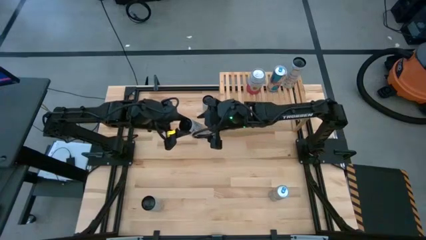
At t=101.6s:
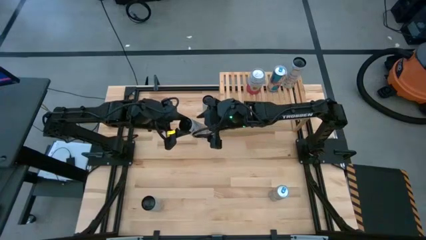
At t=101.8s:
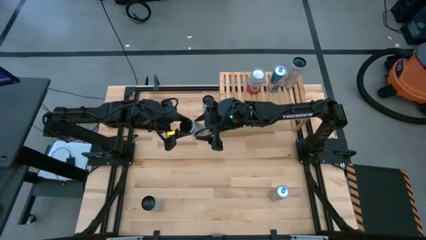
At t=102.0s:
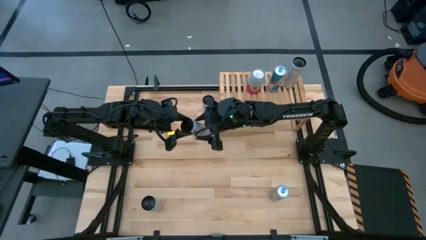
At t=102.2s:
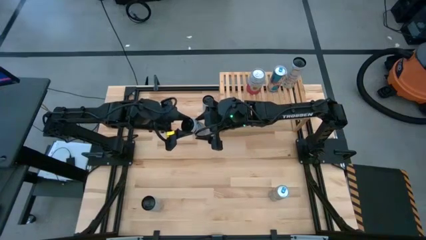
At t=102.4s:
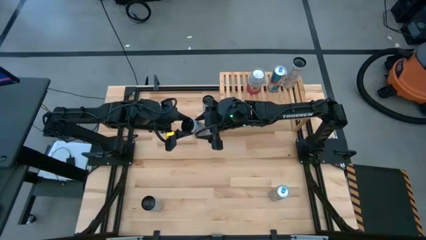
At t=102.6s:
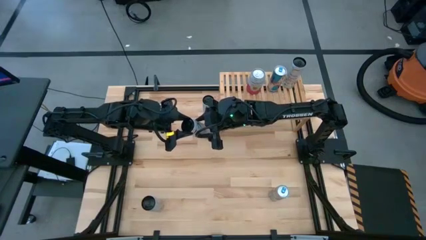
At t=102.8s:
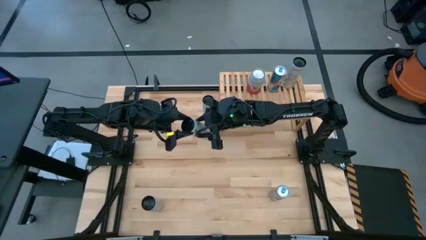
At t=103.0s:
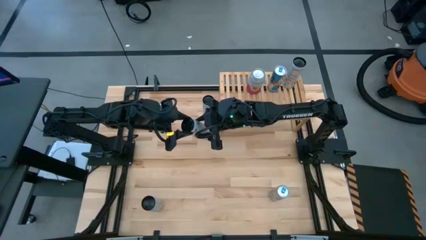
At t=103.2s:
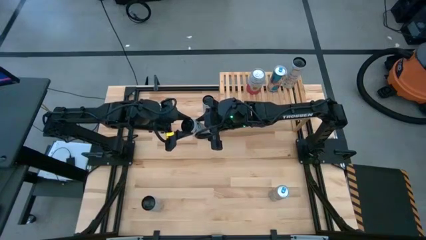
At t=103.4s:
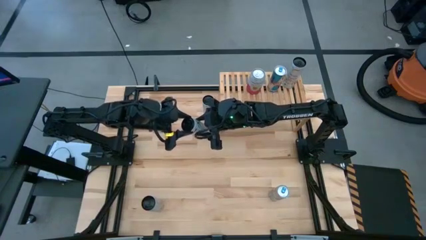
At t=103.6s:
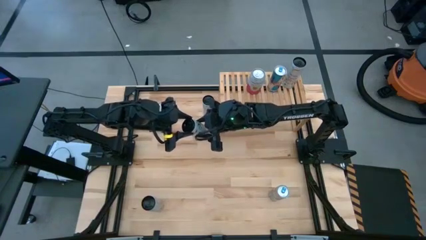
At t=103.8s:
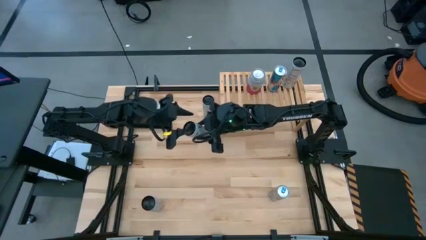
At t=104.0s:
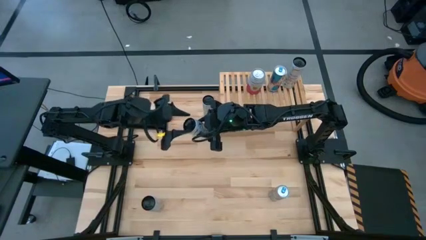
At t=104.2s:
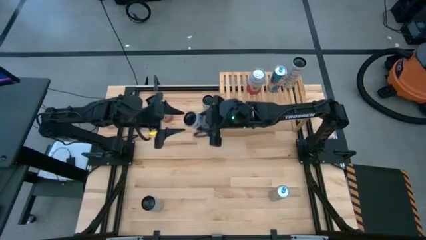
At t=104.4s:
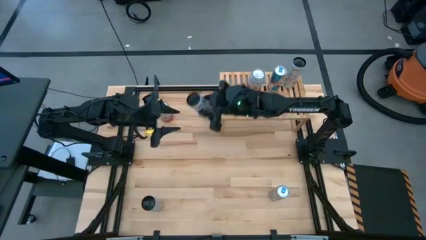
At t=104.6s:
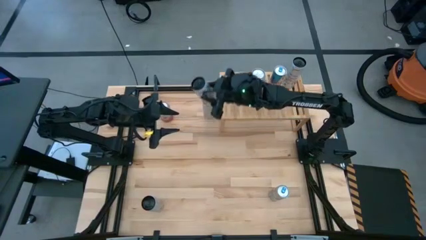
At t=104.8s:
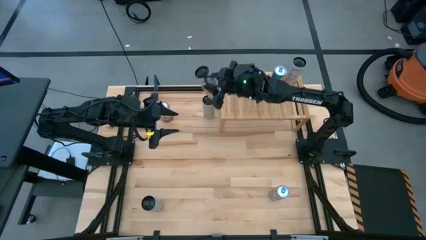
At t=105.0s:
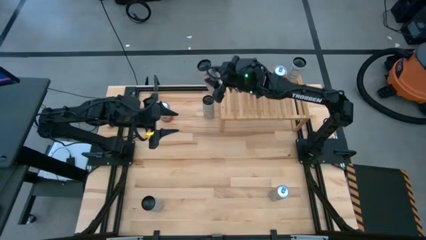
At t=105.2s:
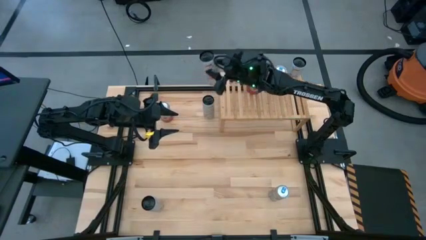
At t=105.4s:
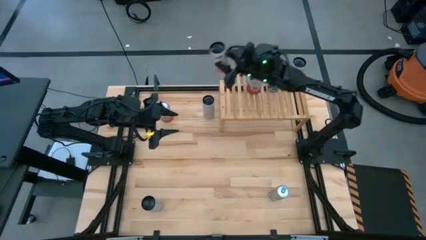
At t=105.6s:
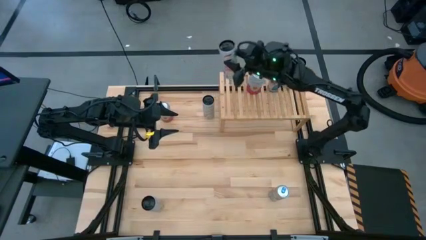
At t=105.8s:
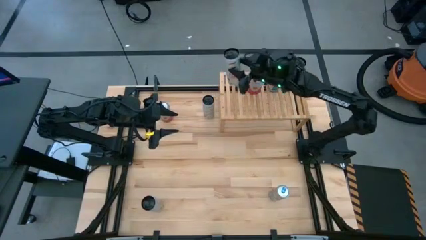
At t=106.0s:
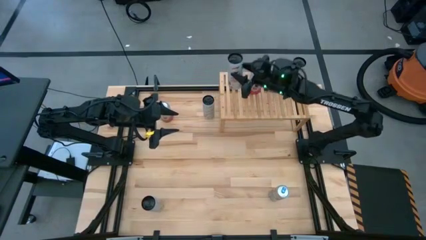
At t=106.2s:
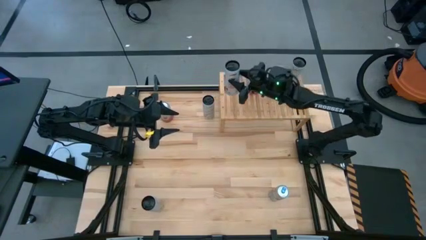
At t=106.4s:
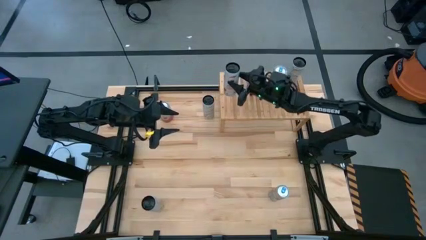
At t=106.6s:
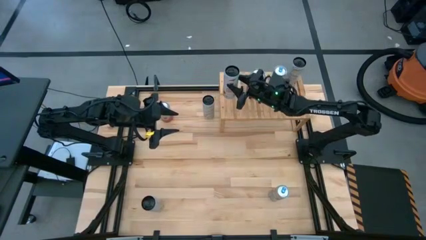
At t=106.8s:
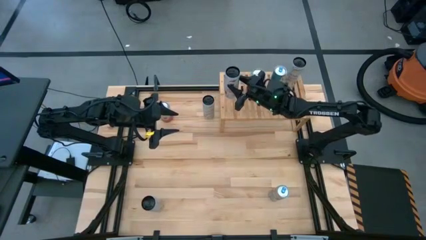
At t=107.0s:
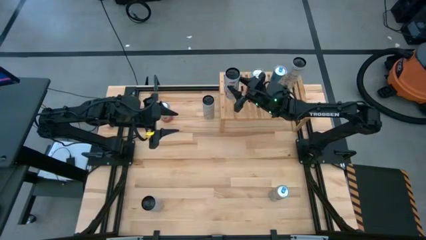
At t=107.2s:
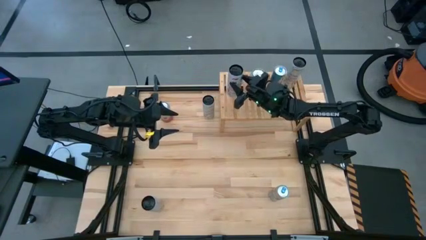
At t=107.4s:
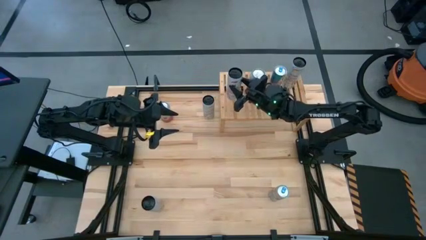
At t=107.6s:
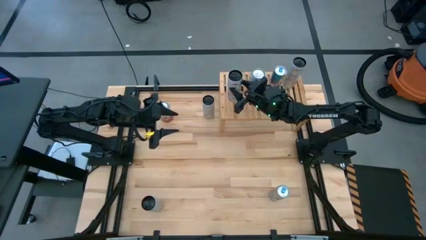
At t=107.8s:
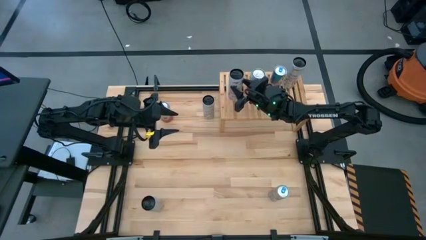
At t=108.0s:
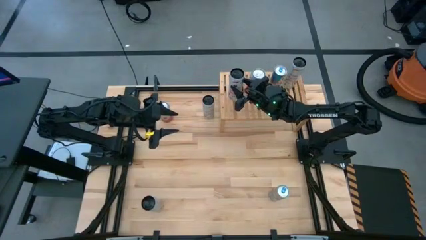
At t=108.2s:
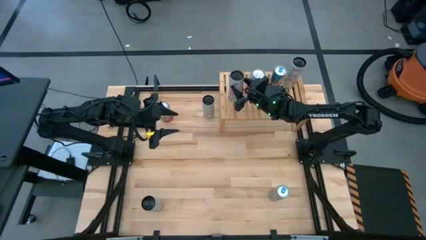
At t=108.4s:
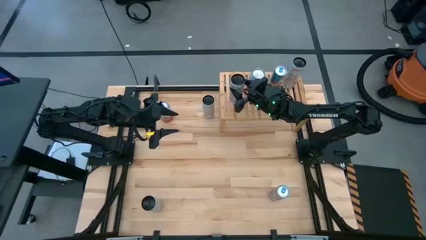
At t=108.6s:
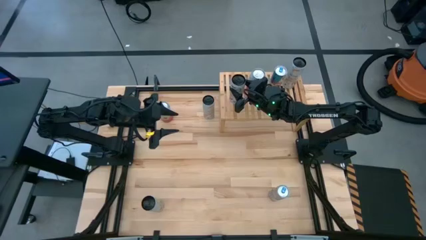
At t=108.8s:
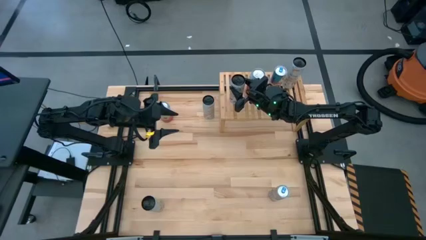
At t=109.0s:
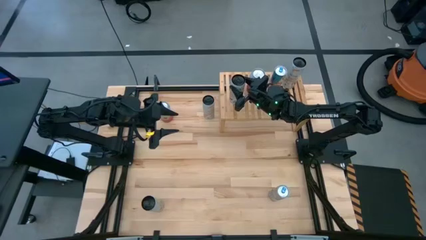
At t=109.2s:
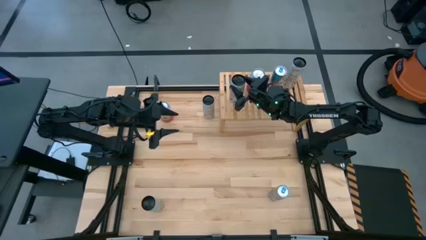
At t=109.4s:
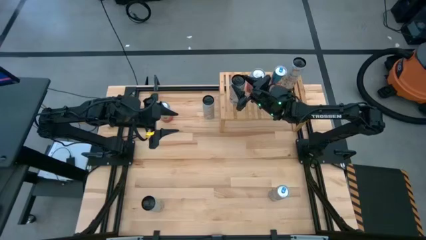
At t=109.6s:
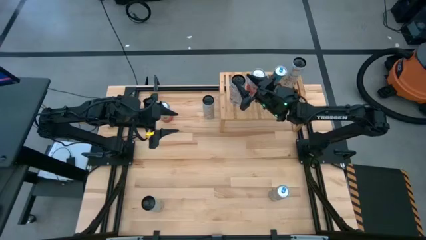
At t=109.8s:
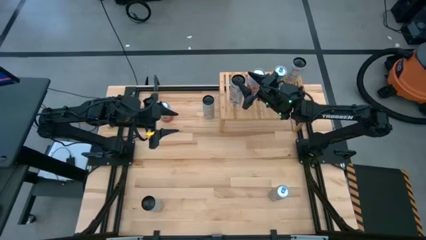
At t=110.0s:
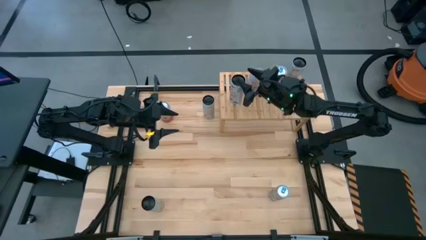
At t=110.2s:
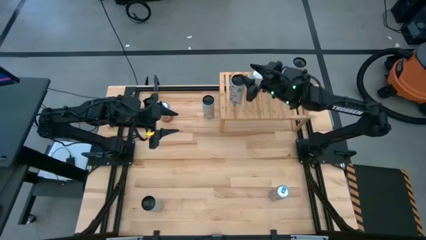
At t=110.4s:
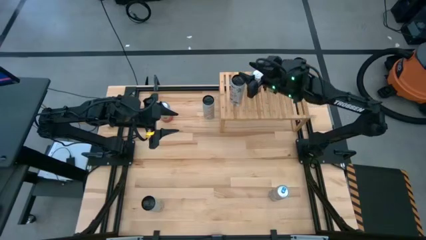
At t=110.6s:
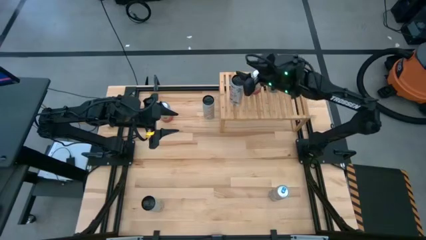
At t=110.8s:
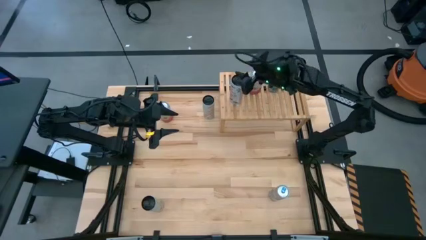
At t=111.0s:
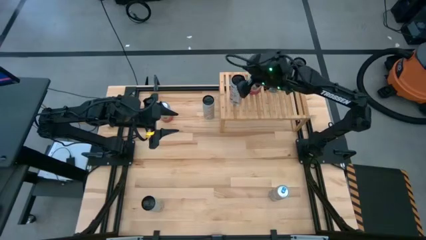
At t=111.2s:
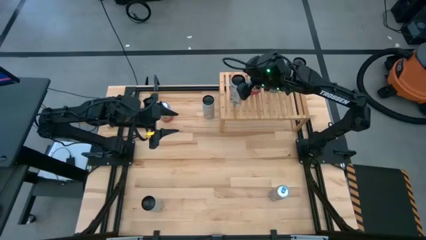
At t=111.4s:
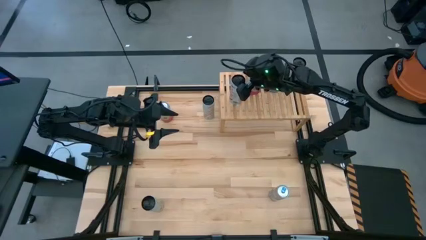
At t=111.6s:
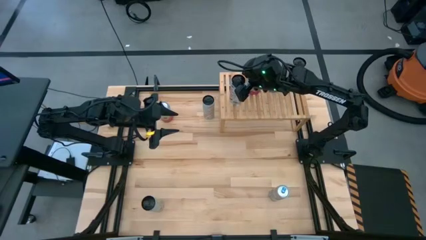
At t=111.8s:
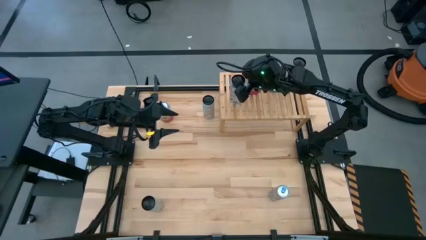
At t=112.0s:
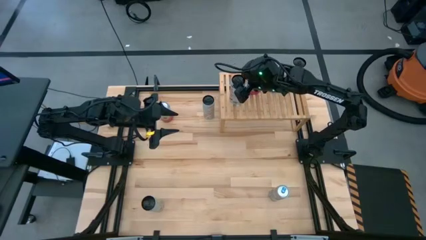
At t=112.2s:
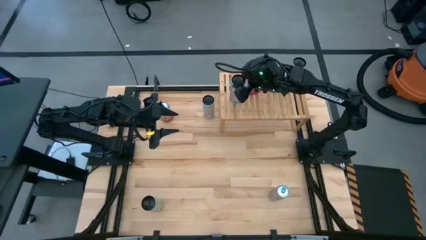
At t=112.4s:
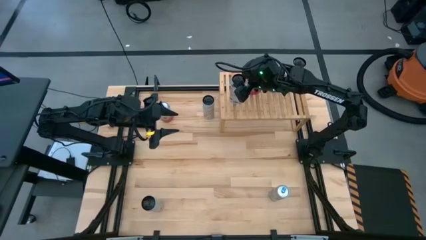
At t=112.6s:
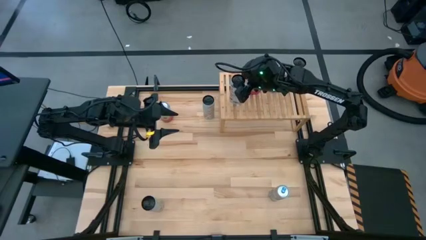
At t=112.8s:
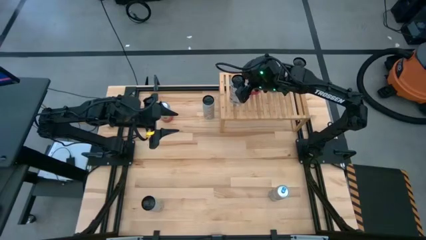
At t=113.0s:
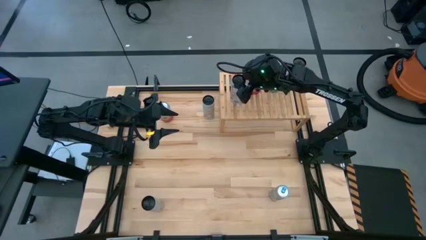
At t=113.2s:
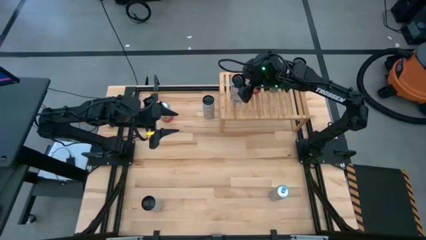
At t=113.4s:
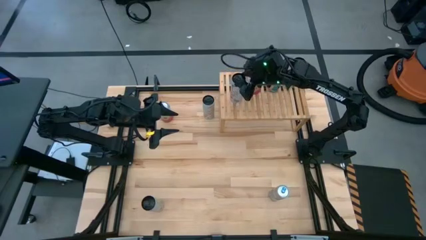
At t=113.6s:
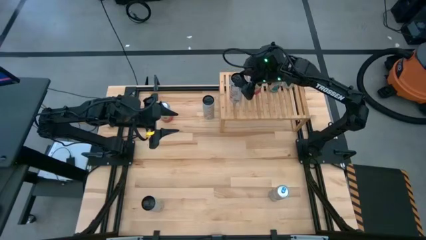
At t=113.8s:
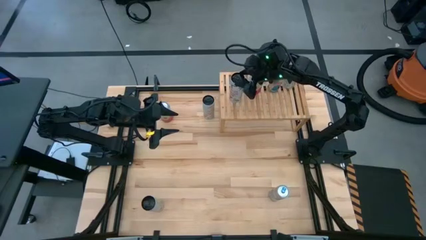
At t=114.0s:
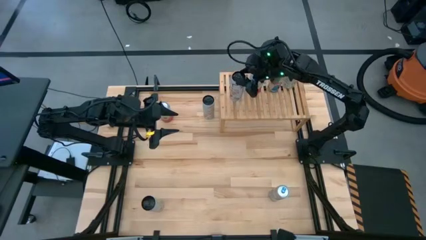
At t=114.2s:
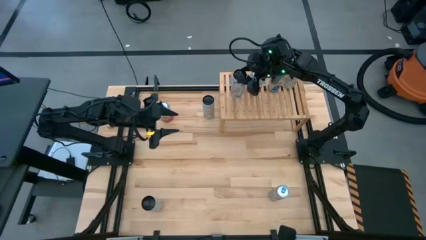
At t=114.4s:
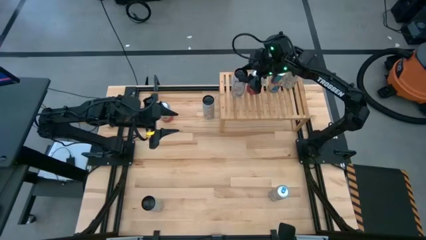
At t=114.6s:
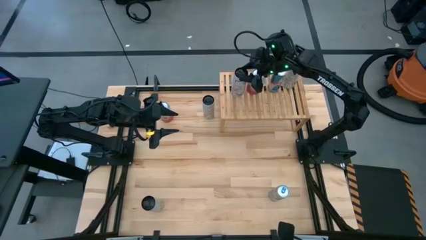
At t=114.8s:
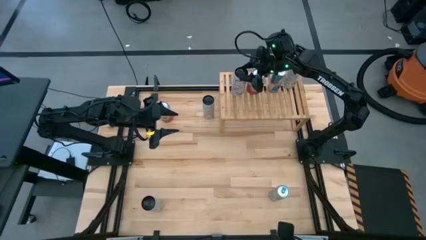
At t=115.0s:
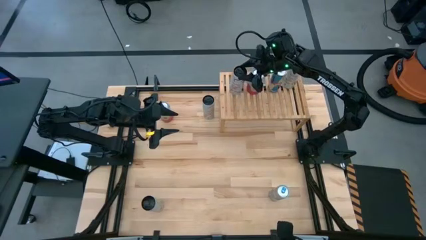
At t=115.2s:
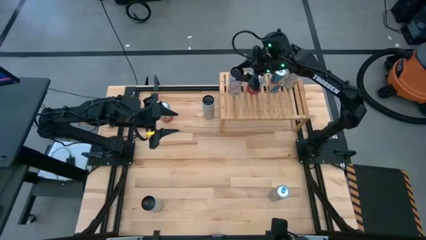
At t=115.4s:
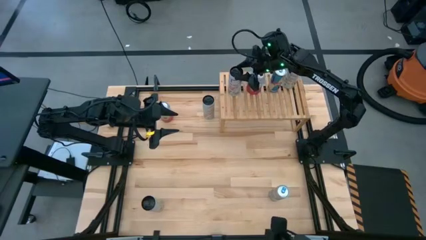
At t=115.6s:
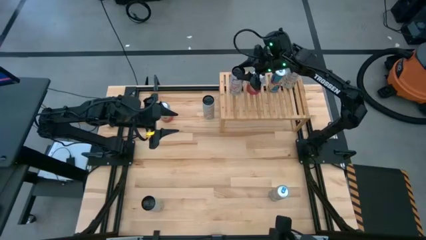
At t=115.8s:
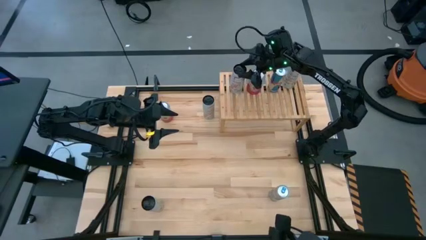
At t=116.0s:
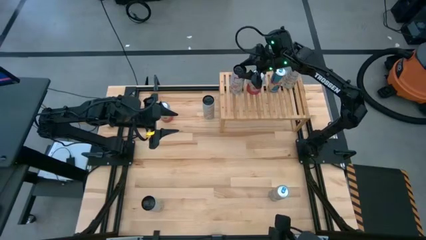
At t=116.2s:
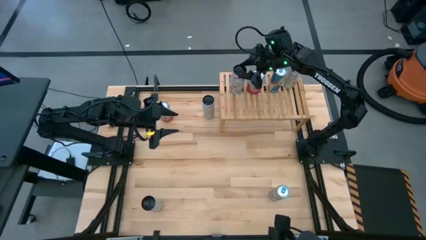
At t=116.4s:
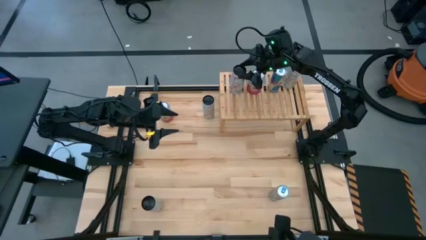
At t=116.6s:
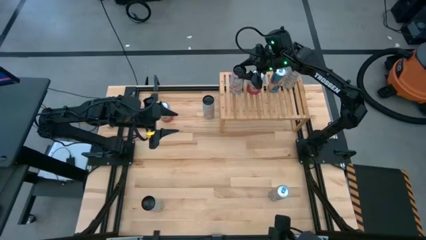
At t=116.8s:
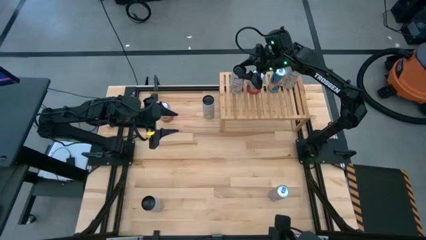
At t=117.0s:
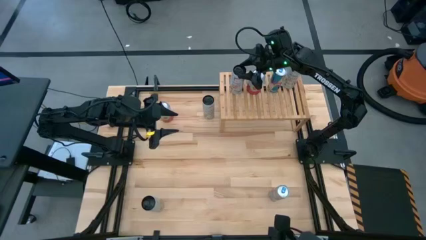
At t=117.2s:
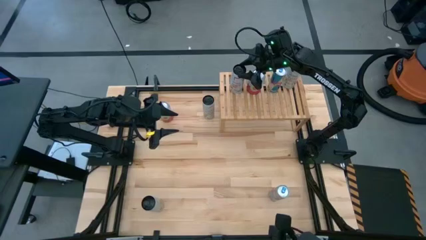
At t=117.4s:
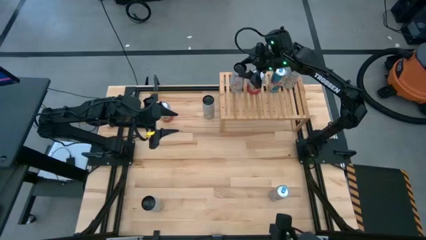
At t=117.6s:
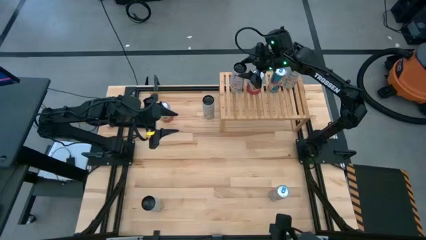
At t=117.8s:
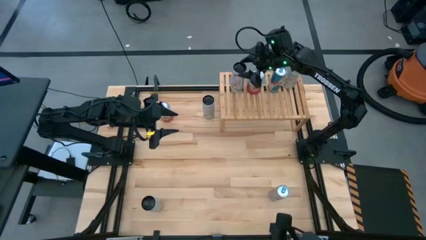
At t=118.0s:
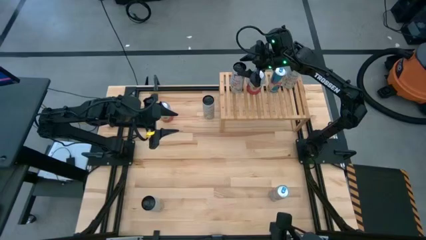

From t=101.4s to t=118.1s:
Task: Place canned beverage on shelf
Put the top white-pink soda can on the shelf
